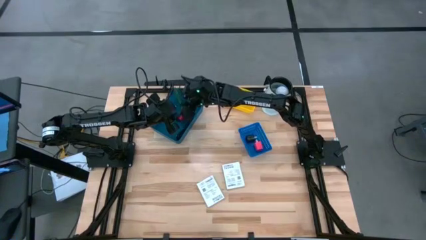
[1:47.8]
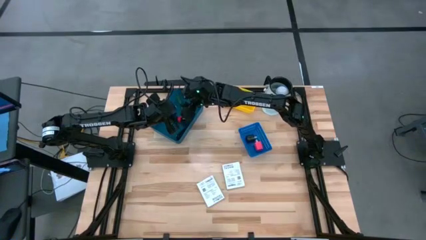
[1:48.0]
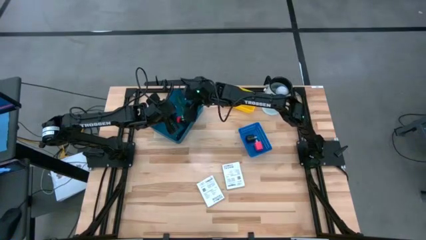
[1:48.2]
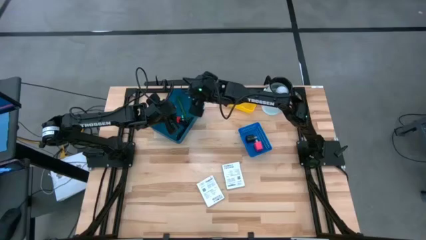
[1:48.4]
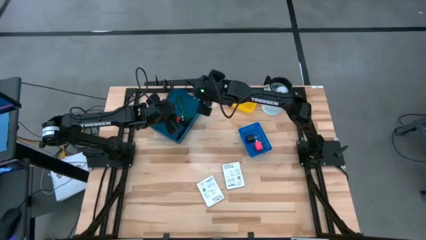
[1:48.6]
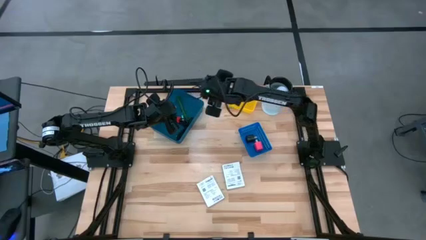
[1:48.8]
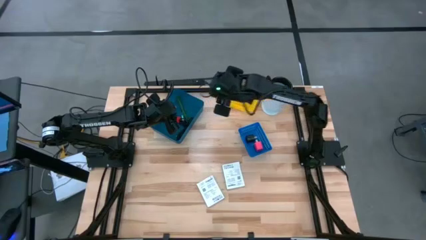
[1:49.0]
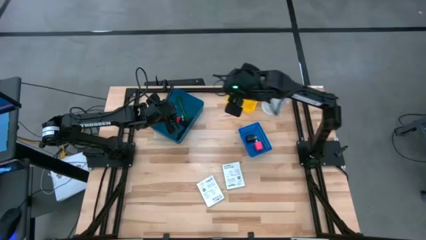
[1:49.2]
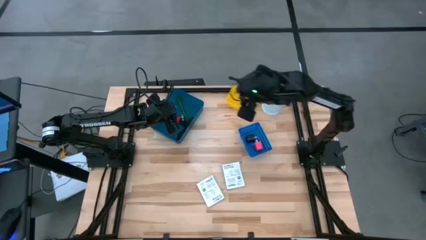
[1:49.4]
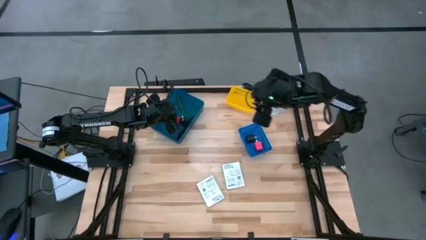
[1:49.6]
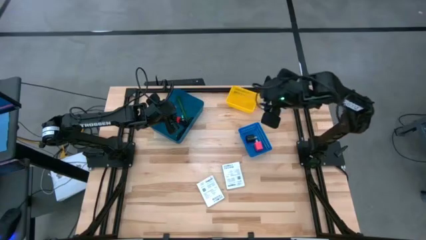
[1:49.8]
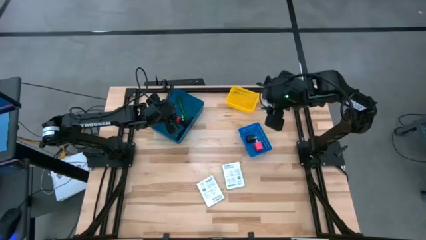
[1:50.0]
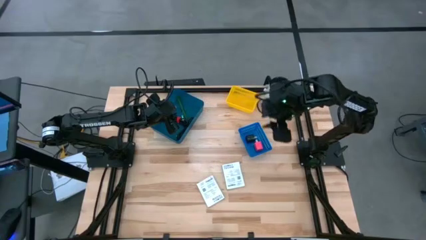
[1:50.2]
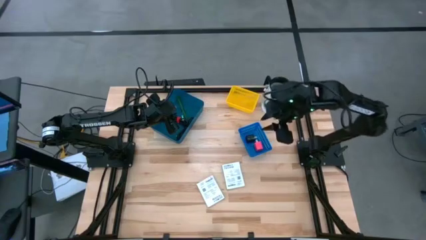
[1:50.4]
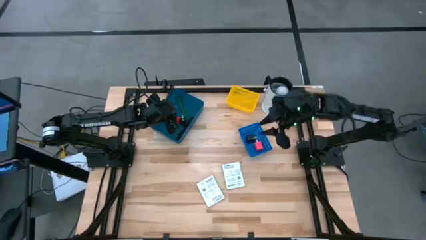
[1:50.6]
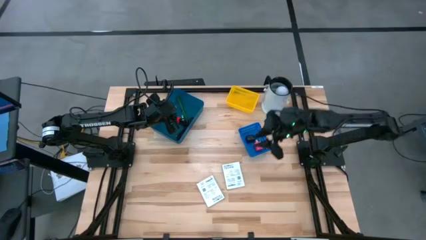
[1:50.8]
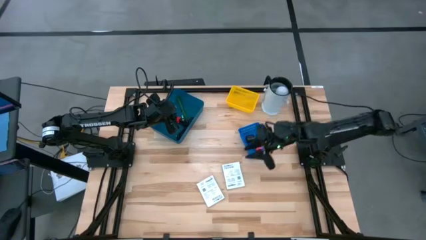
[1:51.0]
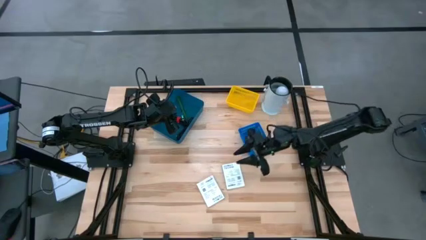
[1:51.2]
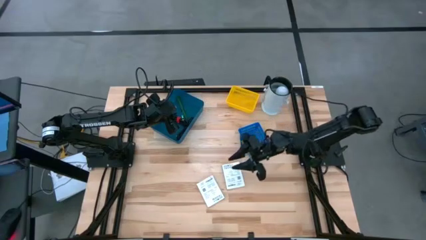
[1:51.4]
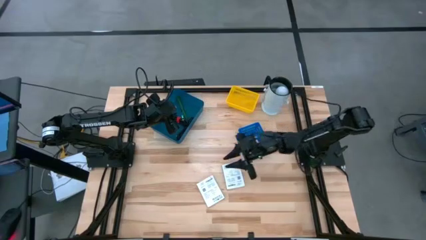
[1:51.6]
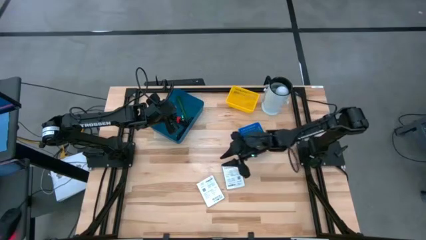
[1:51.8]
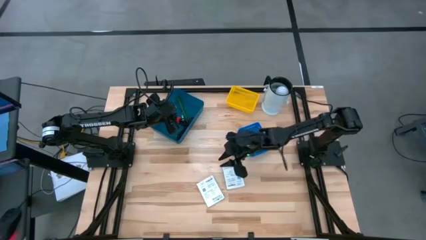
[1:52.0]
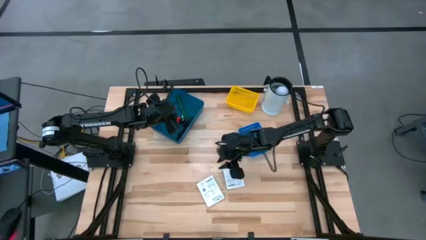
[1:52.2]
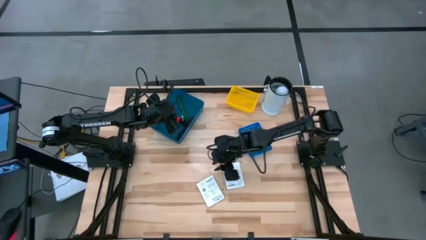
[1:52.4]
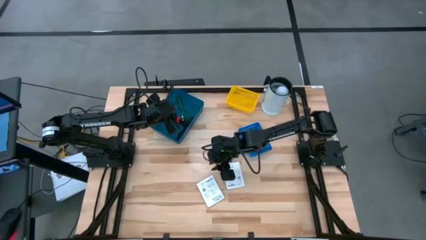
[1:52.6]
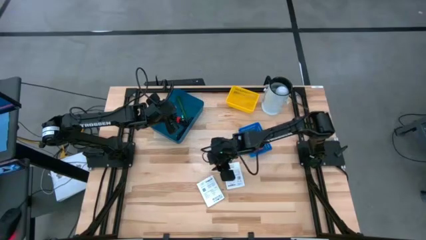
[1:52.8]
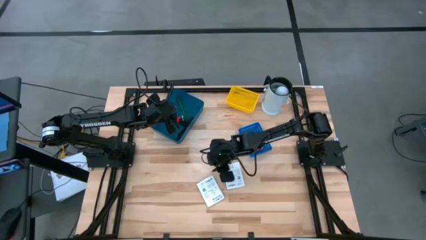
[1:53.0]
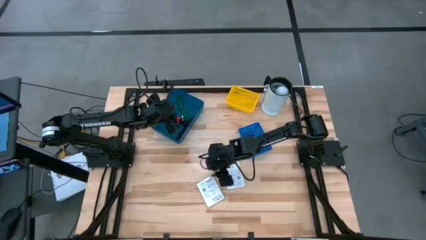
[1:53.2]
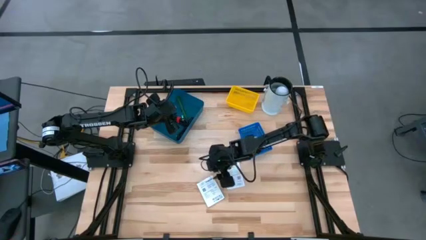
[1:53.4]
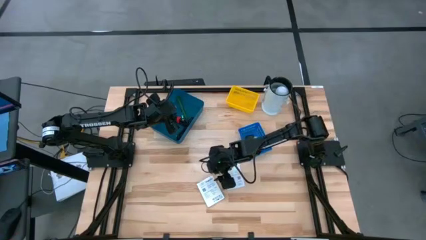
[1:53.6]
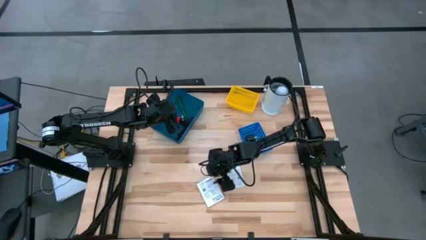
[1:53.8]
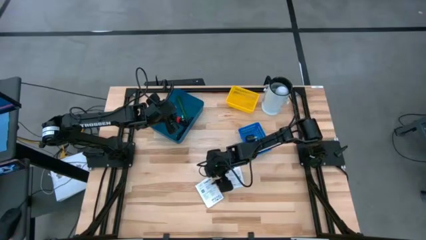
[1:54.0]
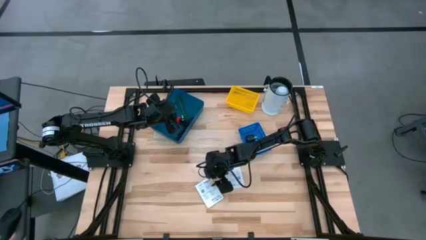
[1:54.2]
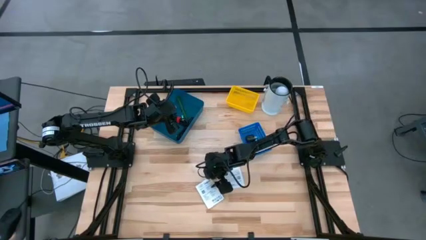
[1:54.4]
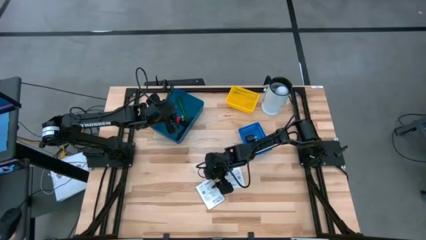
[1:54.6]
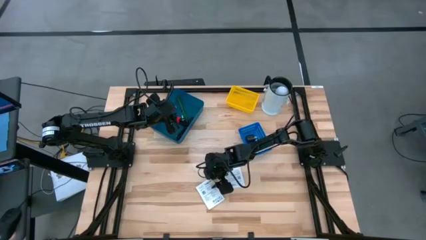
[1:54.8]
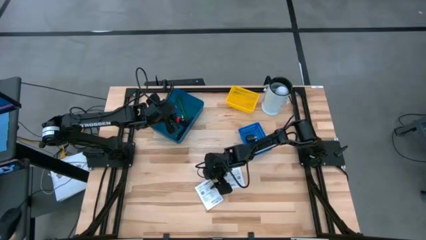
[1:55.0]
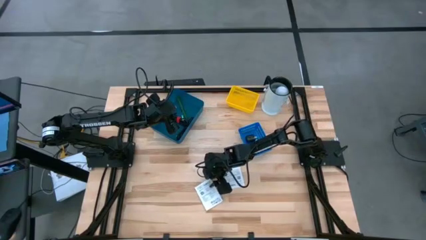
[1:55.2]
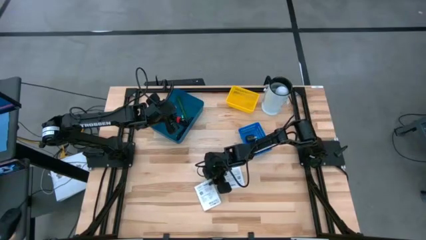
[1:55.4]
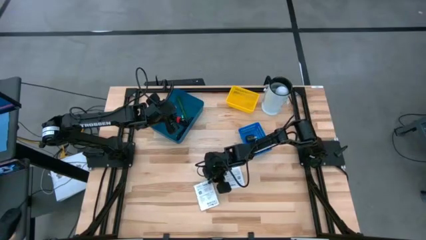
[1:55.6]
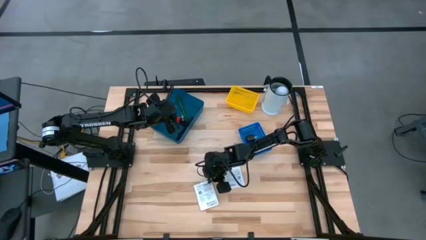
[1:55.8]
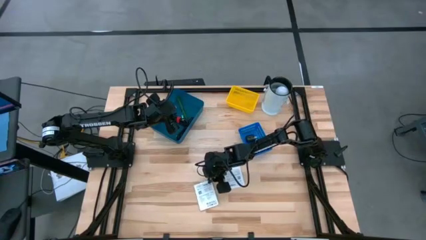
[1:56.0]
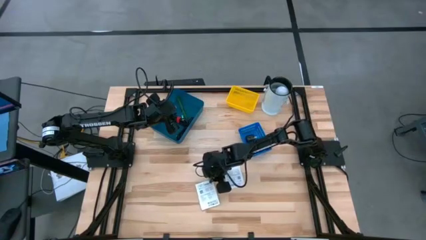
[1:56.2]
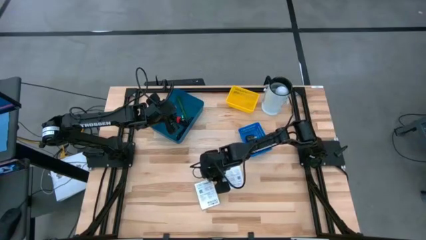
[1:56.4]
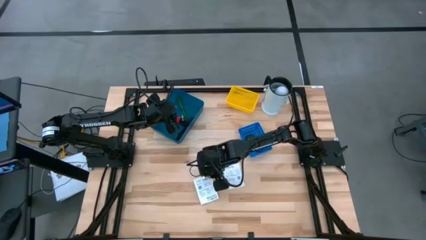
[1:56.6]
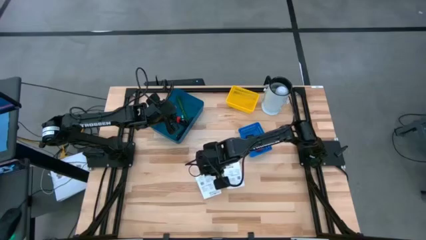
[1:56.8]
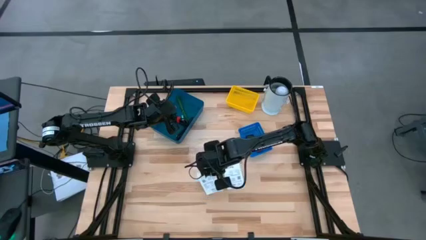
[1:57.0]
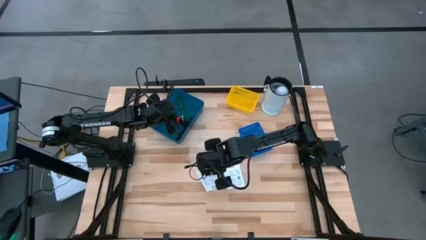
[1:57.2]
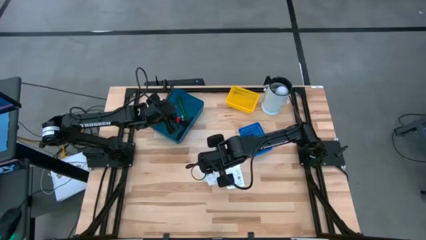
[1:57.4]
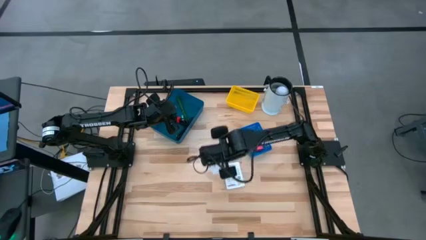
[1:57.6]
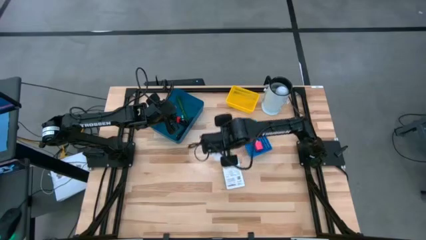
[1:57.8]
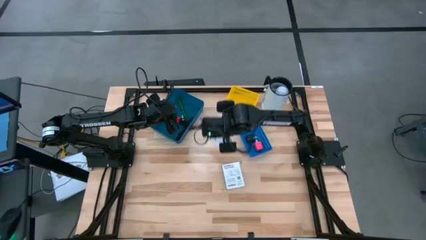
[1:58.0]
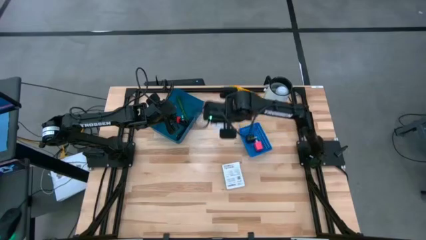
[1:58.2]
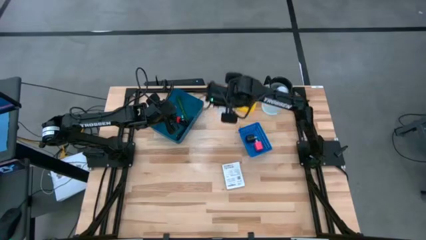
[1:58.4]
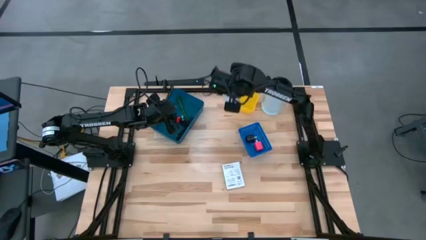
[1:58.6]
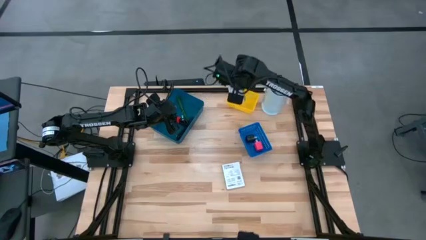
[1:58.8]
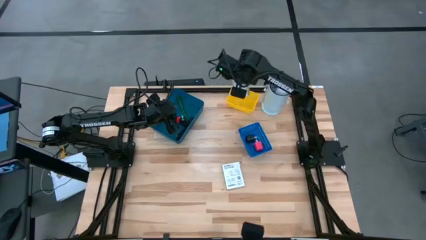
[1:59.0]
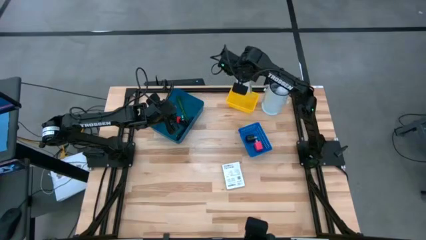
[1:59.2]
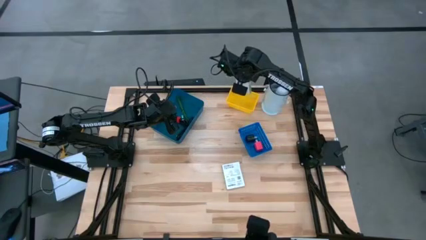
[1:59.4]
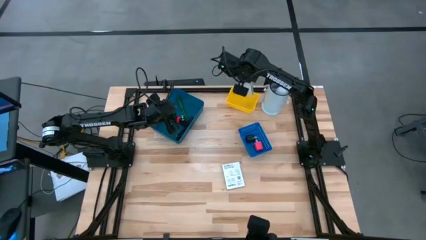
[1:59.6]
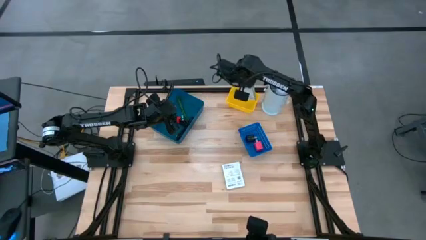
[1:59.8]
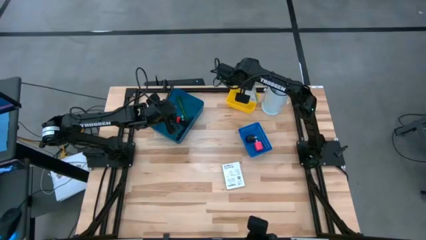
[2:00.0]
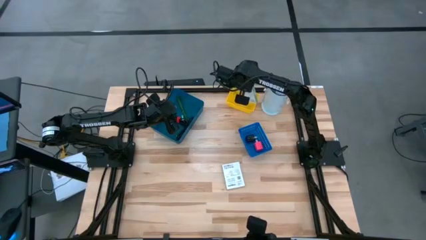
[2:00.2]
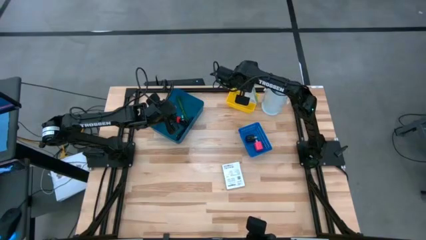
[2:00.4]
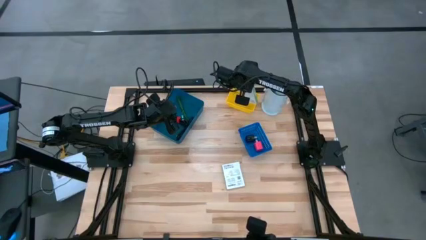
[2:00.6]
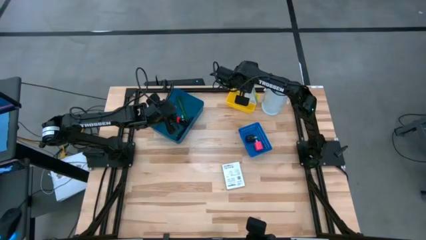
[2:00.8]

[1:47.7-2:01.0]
Task: Pick and place items into bin
Put the left white card reader box into the yellow bin

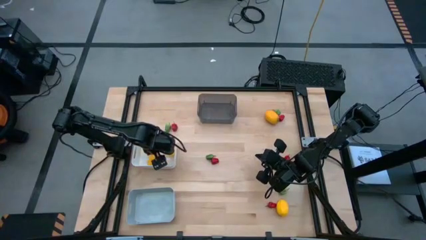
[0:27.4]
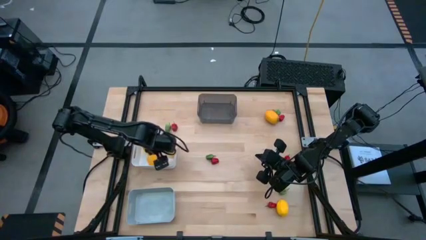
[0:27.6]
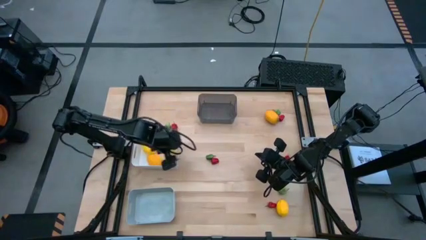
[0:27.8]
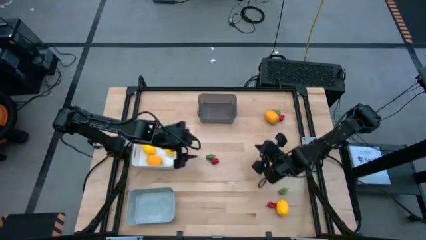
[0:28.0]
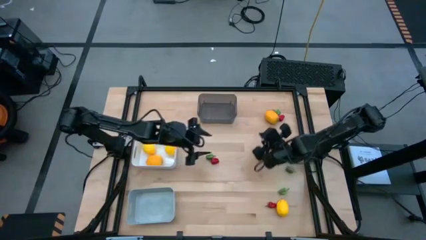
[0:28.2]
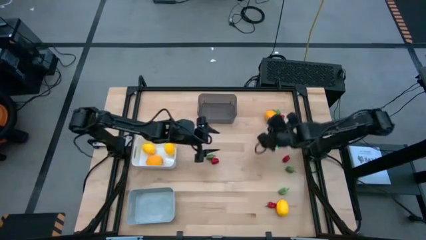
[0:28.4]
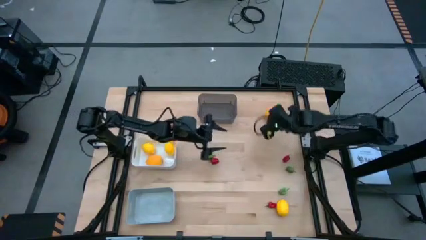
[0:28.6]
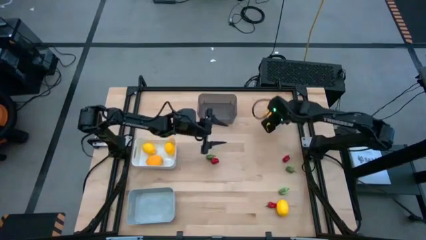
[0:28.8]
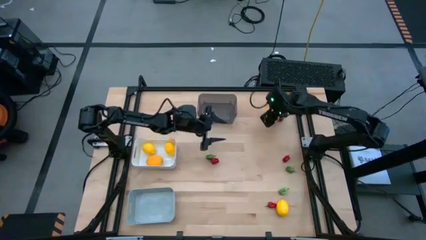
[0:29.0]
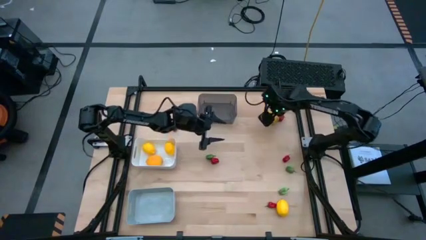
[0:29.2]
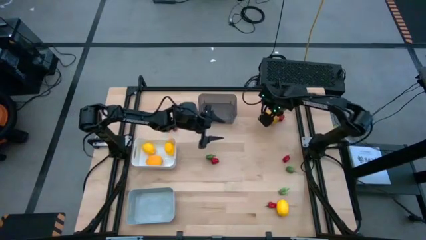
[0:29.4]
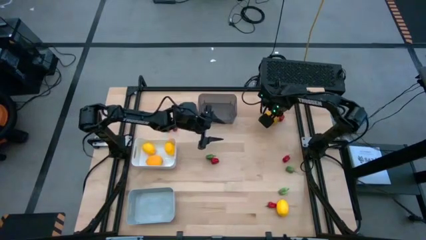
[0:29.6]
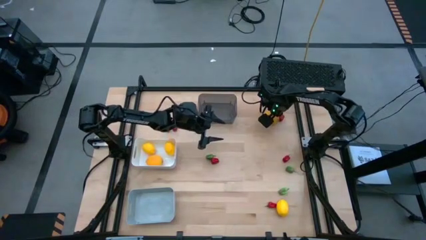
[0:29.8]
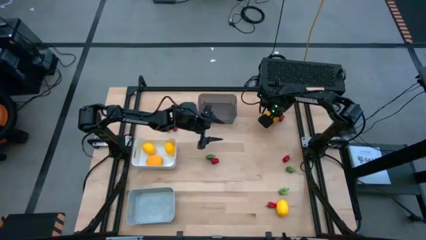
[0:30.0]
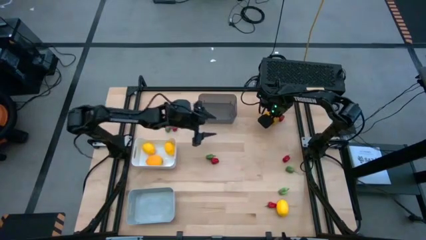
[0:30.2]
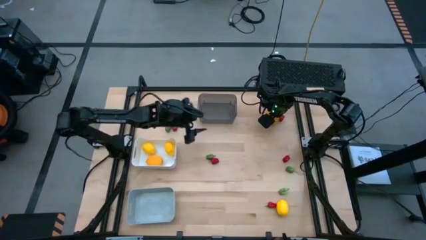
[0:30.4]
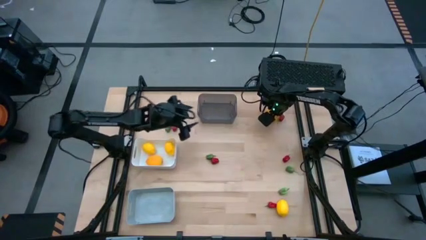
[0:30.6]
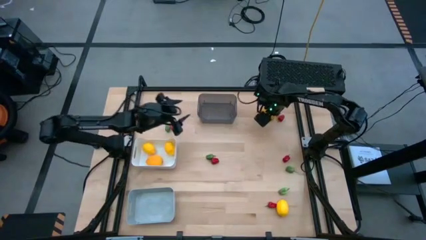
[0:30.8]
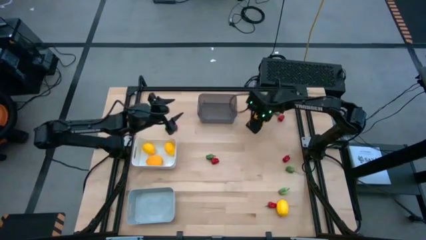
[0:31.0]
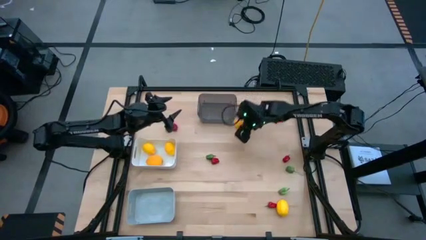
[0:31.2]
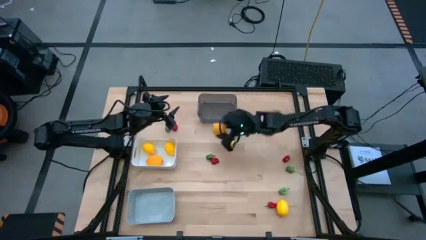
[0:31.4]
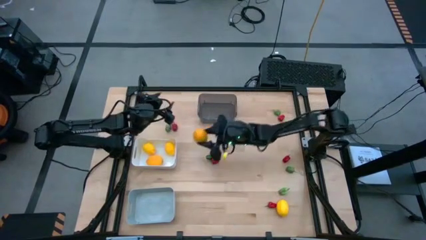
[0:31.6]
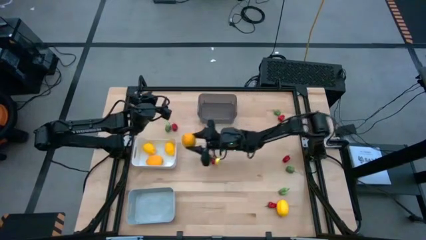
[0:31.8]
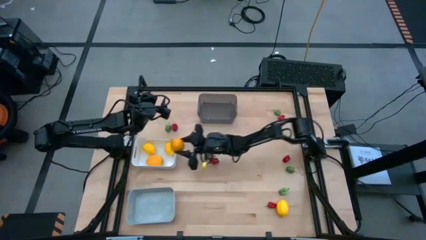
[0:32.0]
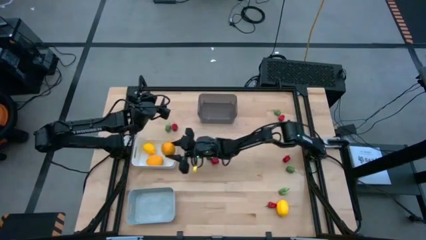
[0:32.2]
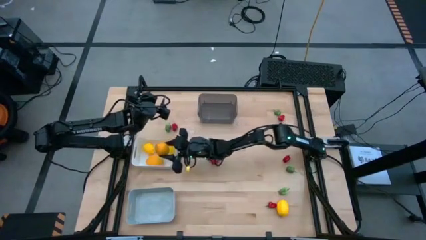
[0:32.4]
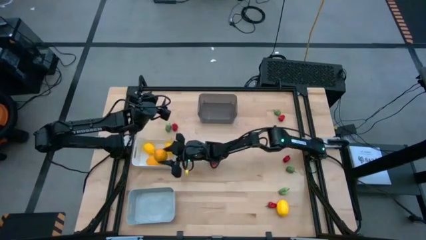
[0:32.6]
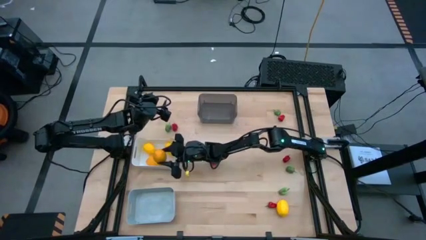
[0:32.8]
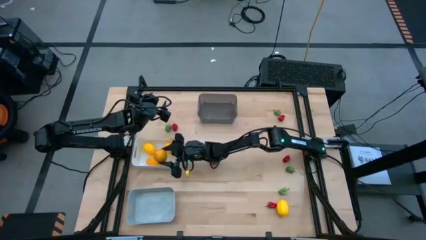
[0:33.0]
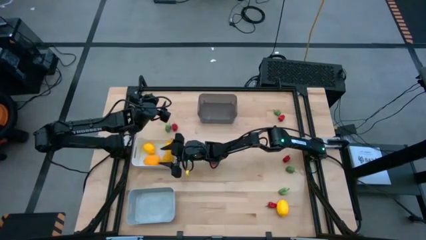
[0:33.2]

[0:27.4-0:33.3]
Task: Sort produce into baskets
Put the lemon into the white bin
